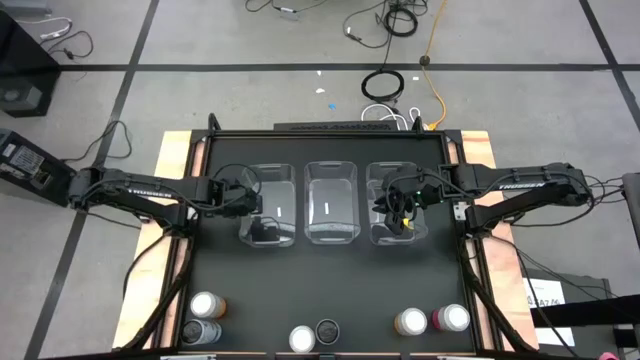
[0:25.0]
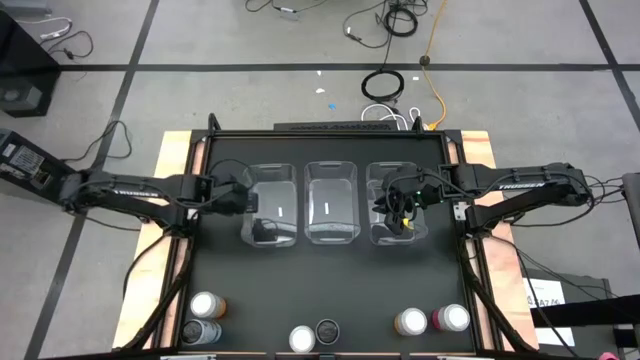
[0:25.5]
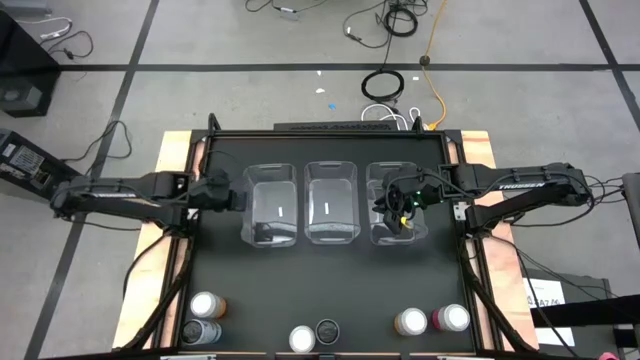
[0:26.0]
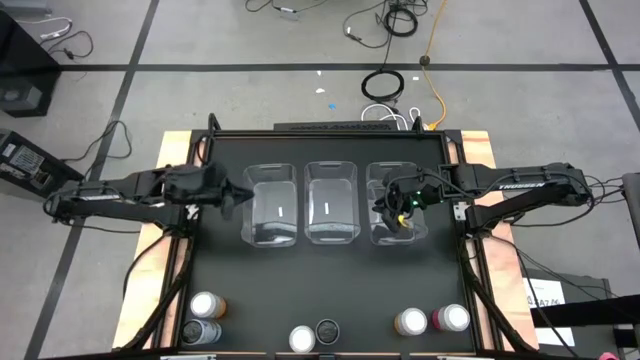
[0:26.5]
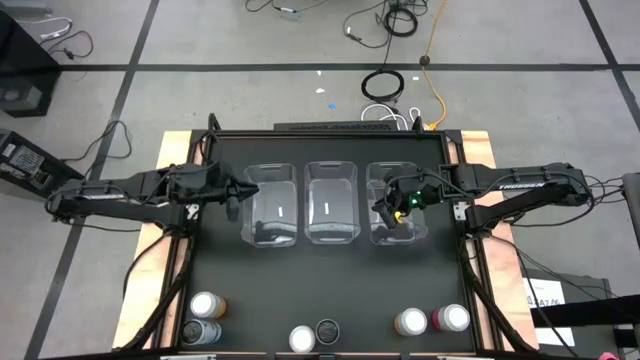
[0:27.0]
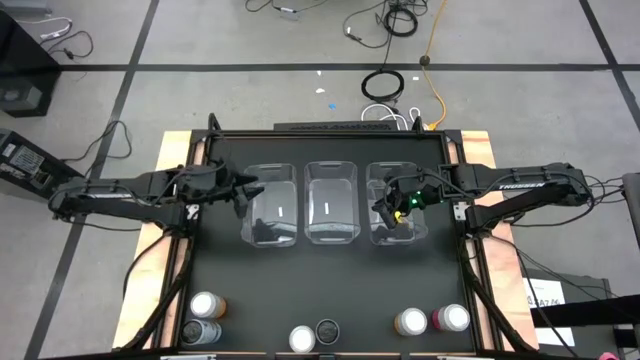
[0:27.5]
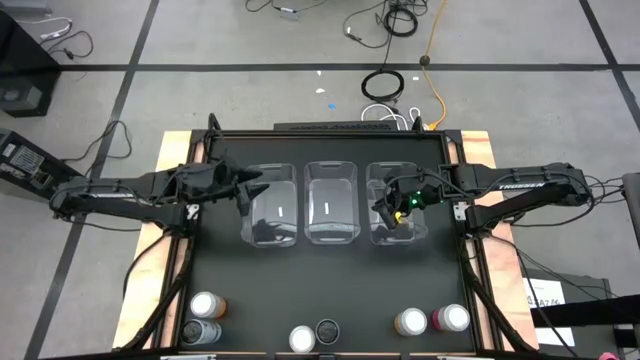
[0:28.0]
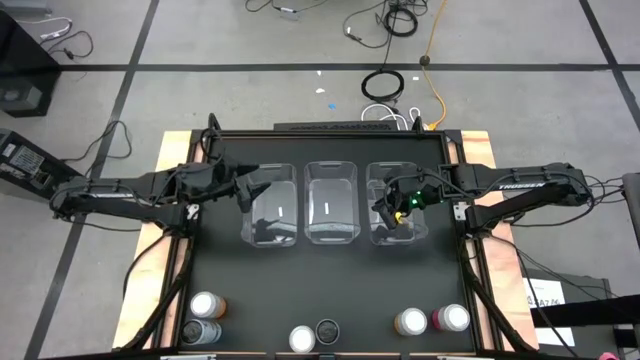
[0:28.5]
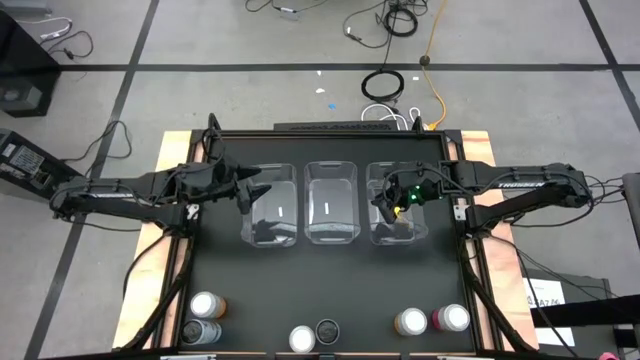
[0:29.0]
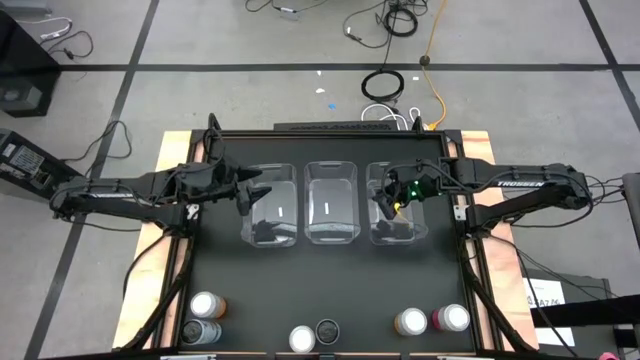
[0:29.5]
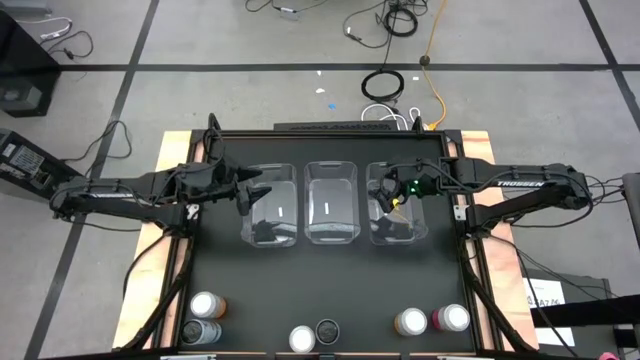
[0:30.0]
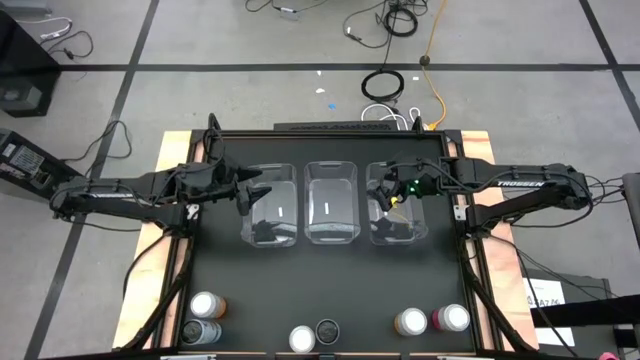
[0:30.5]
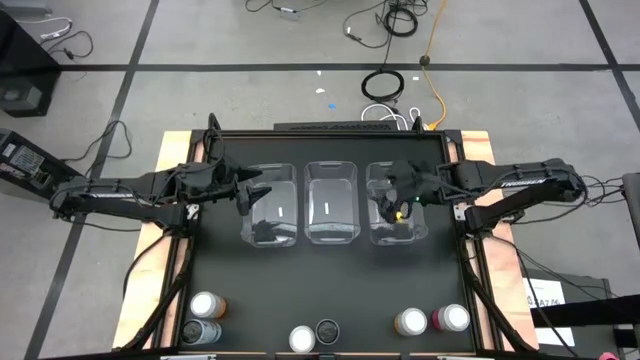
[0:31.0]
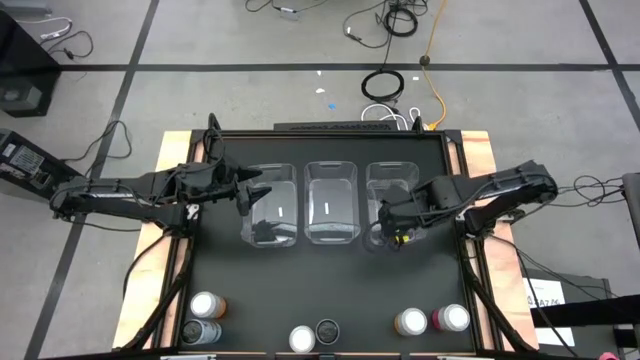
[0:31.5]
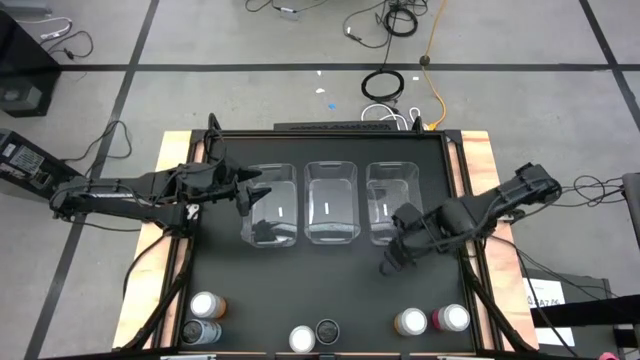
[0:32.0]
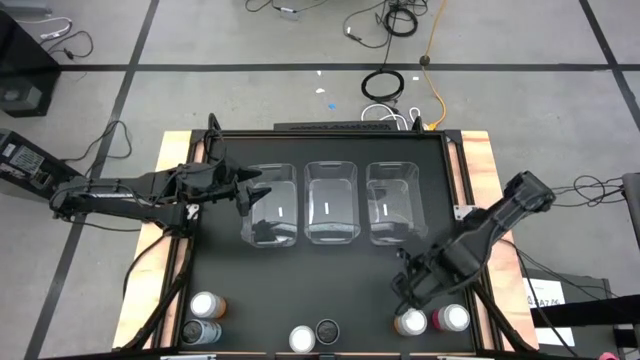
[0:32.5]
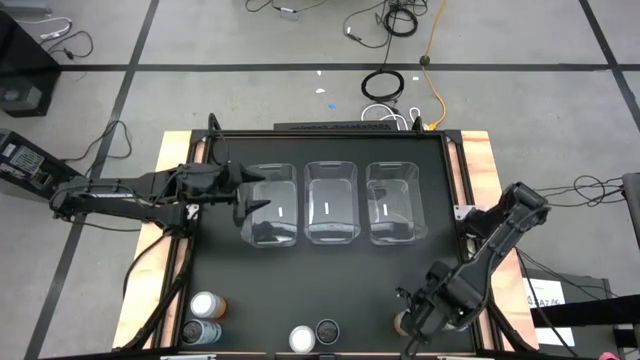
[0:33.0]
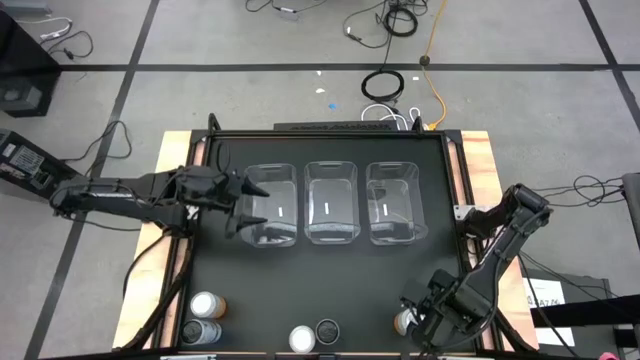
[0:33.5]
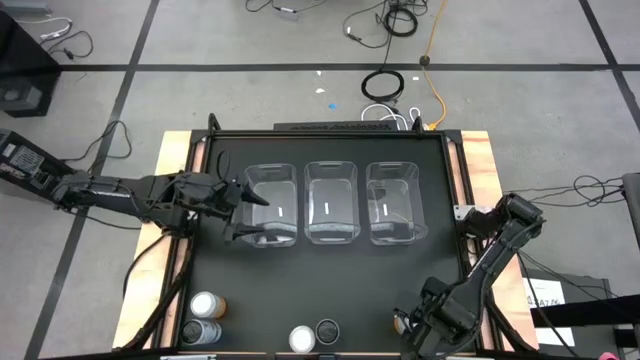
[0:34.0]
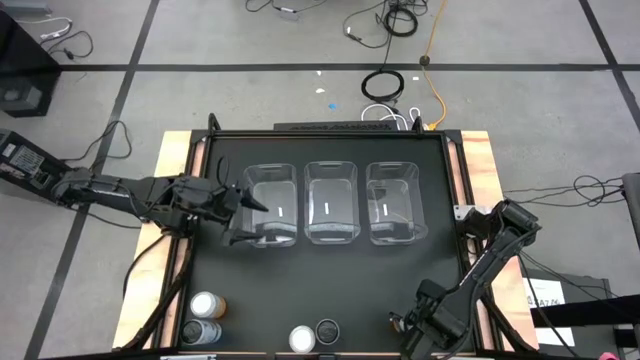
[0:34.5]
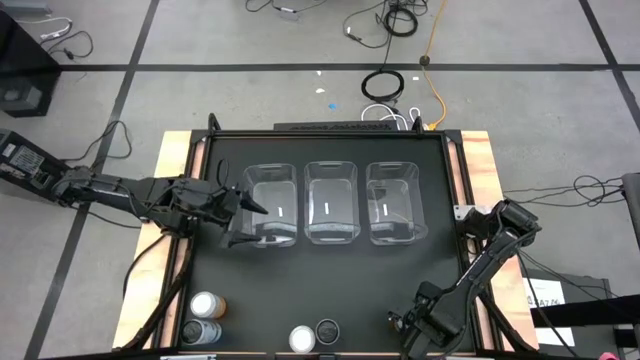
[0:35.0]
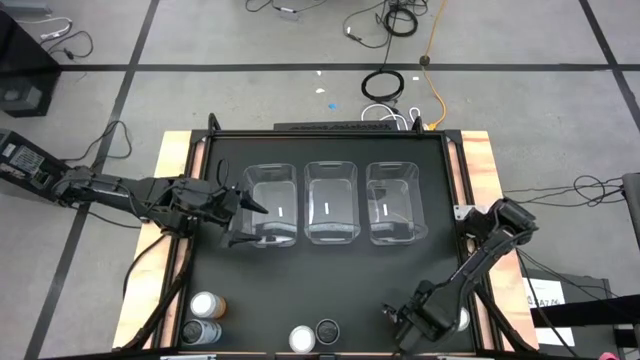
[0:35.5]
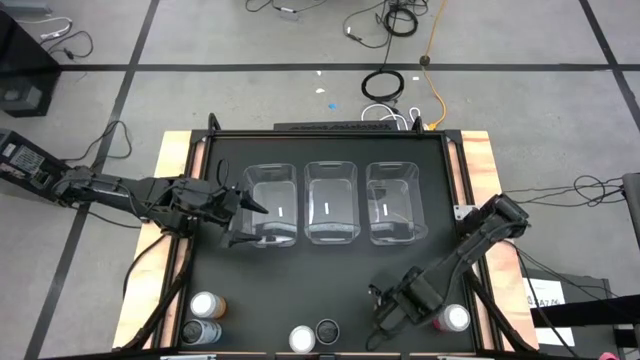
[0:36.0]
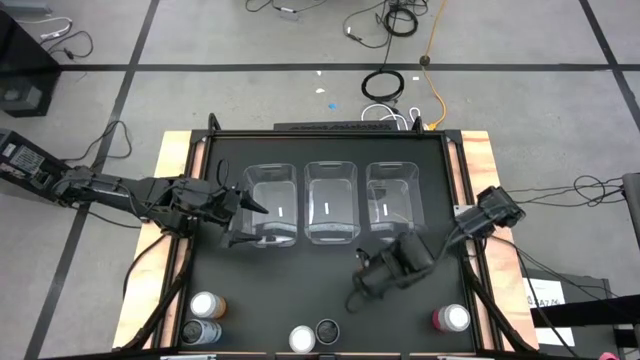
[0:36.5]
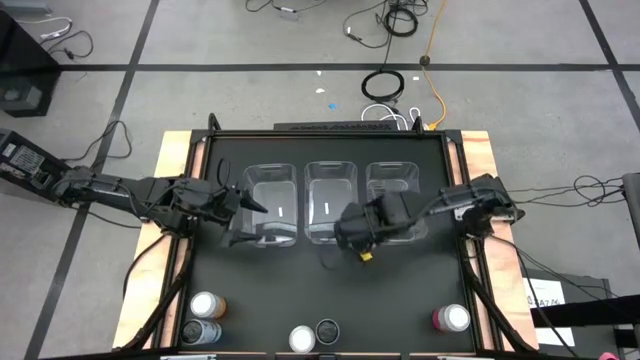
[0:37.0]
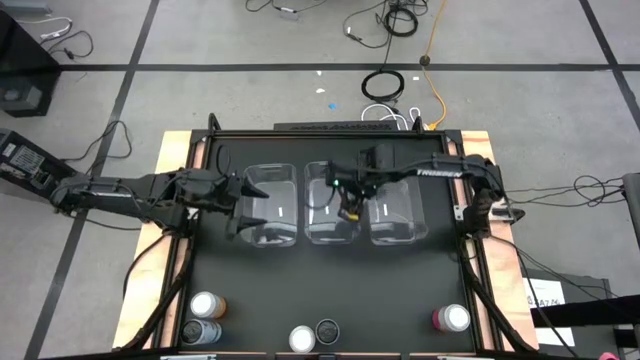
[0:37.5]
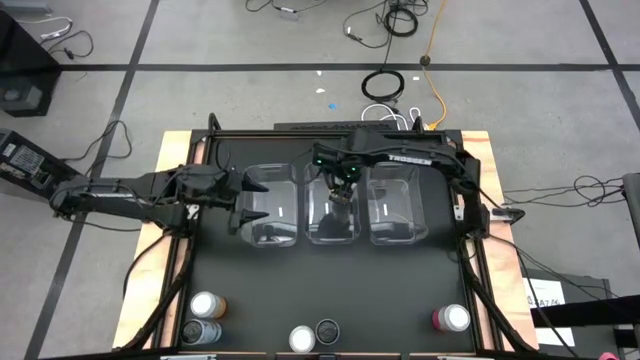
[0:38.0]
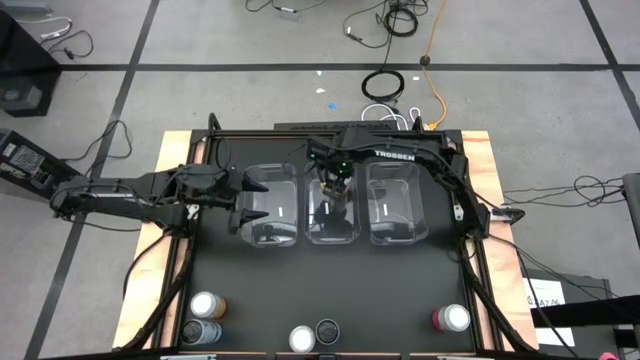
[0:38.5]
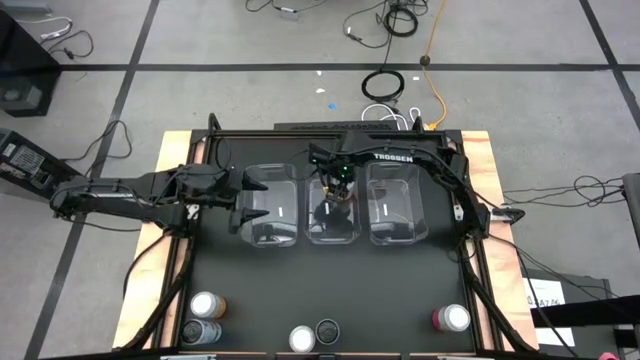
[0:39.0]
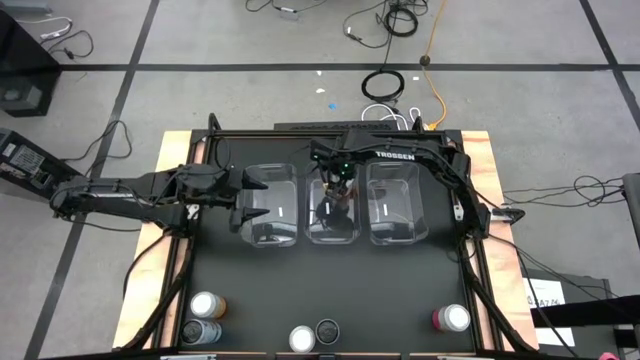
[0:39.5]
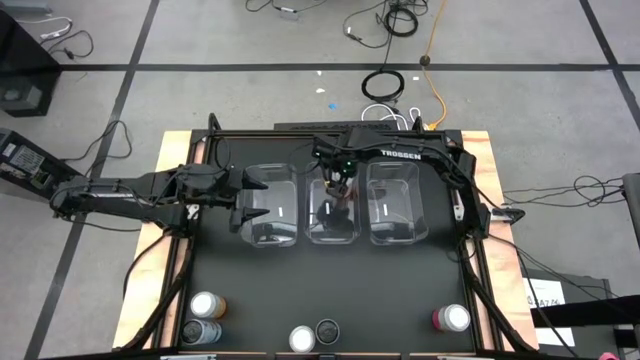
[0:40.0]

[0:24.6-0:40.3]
Task: Sort soda cans
Put the right orange soda can into the center transparent bin

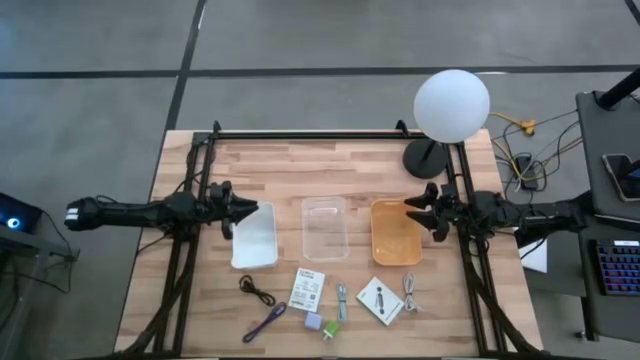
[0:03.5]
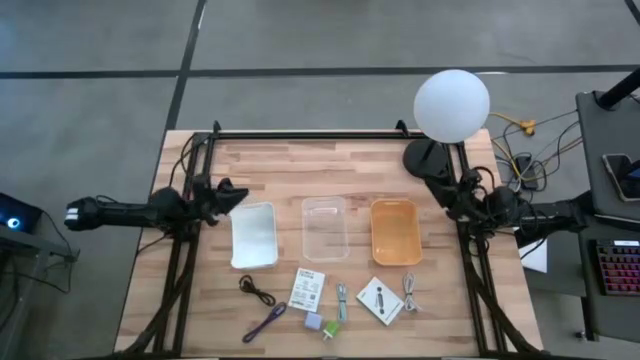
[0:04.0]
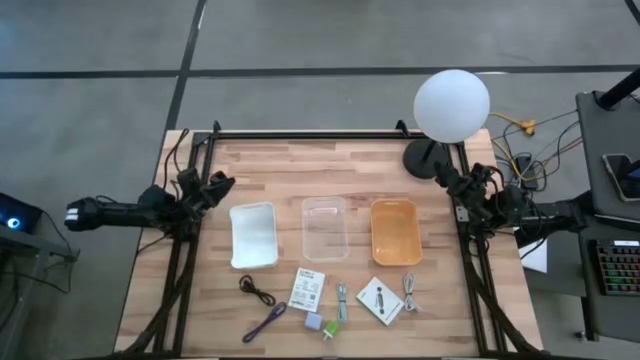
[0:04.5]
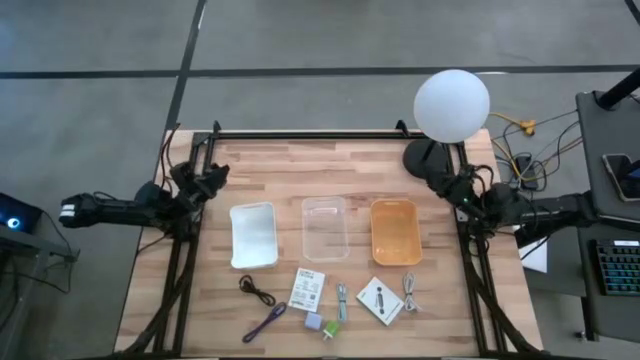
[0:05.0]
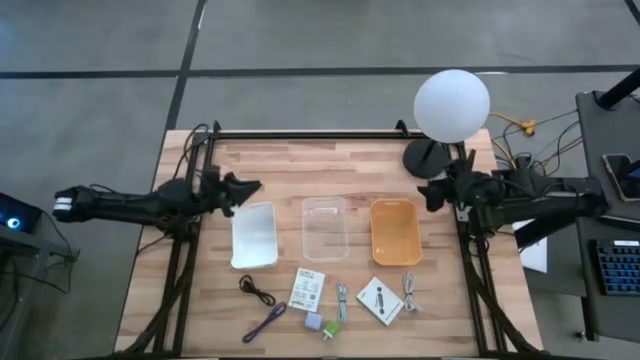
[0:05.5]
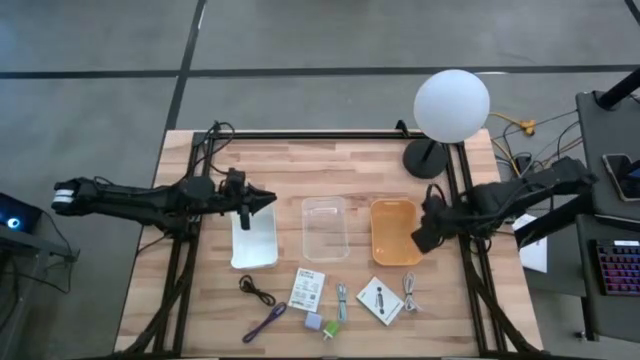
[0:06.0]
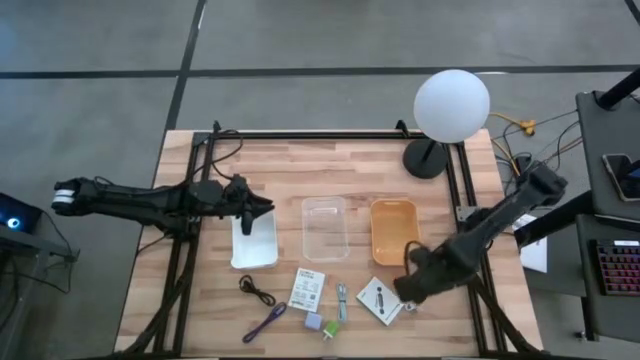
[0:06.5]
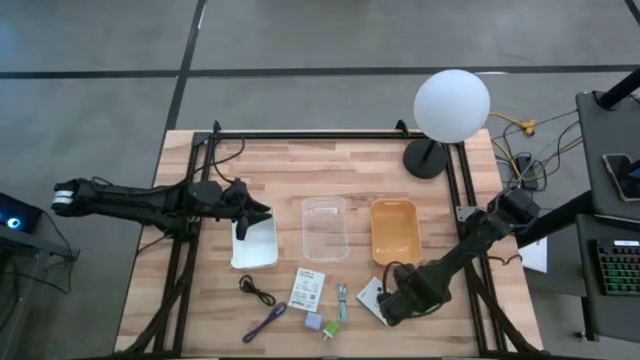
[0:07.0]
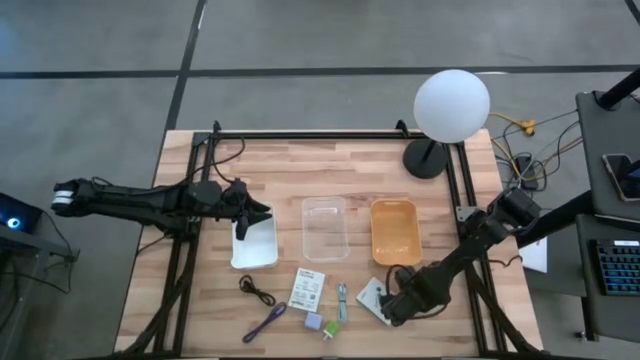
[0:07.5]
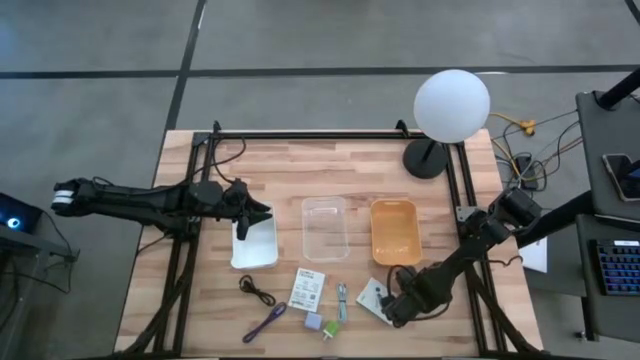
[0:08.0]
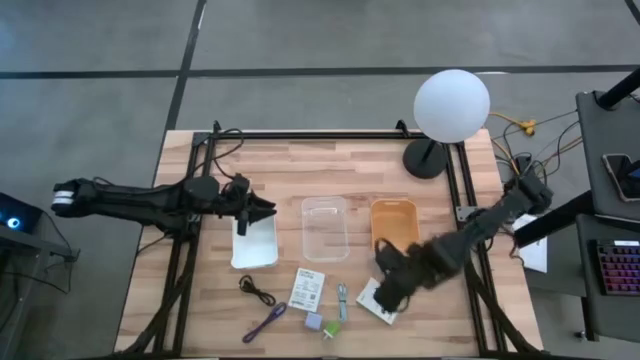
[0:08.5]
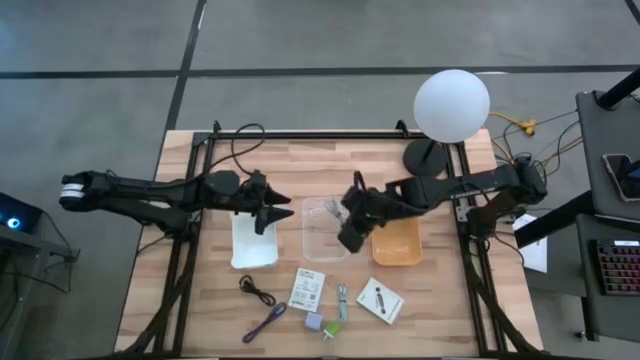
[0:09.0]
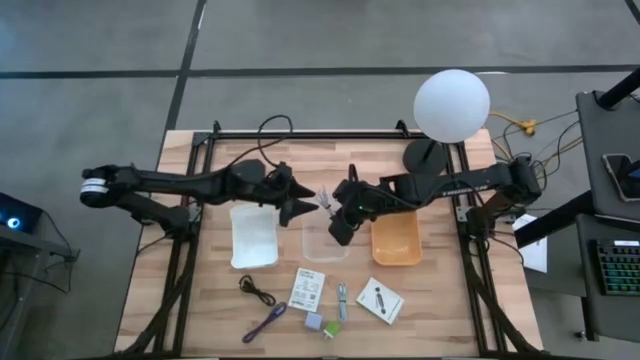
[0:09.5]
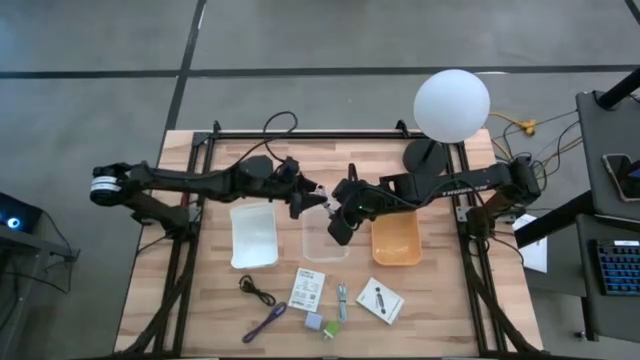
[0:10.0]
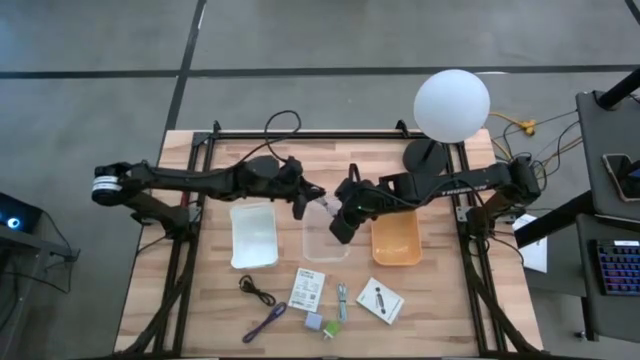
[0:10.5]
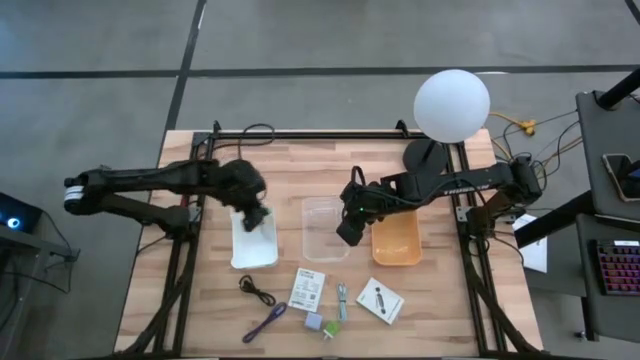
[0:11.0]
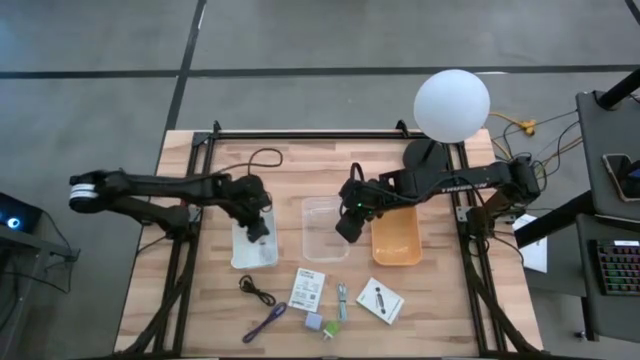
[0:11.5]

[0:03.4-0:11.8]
Task: Pick and place items into bin
Put the white charger cable into the white bin
